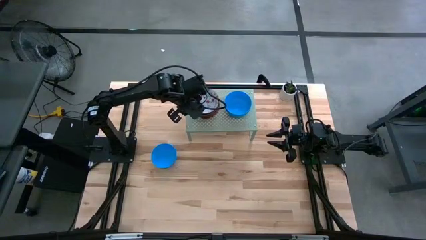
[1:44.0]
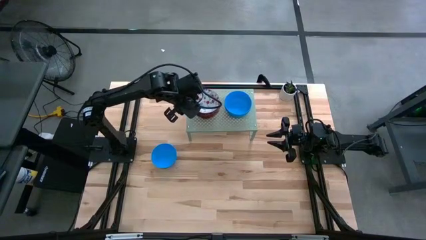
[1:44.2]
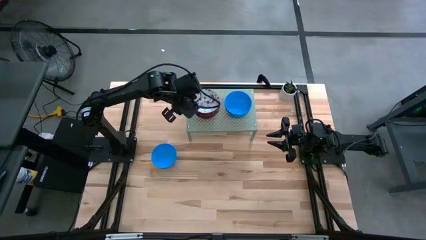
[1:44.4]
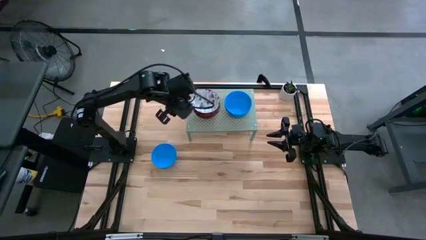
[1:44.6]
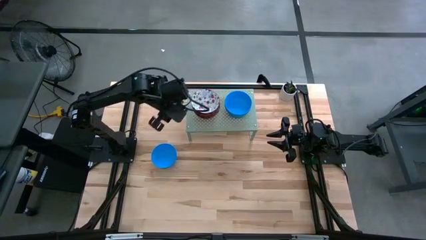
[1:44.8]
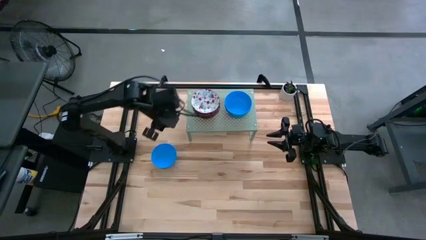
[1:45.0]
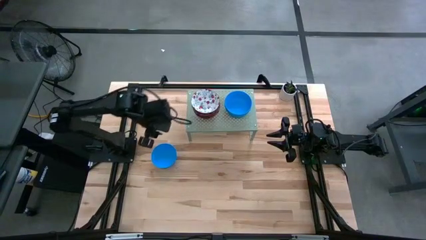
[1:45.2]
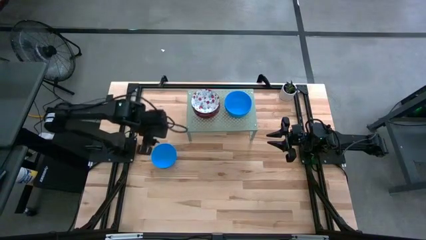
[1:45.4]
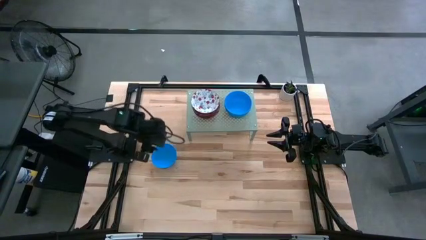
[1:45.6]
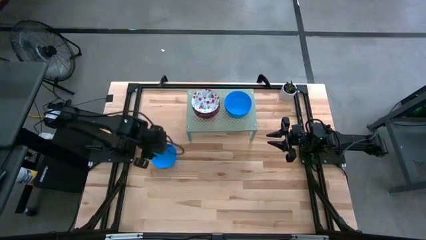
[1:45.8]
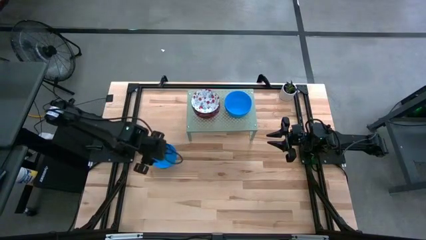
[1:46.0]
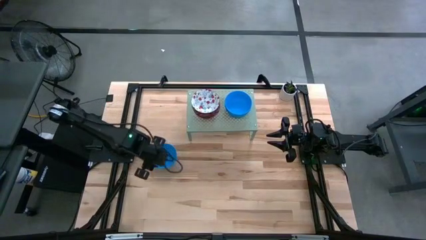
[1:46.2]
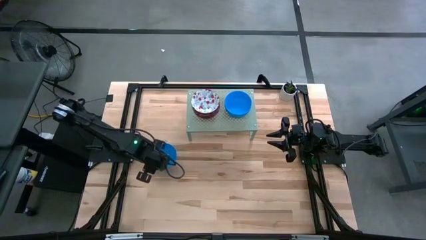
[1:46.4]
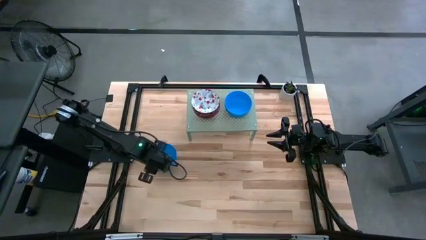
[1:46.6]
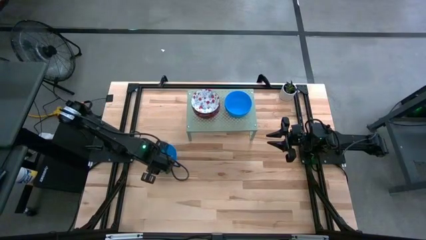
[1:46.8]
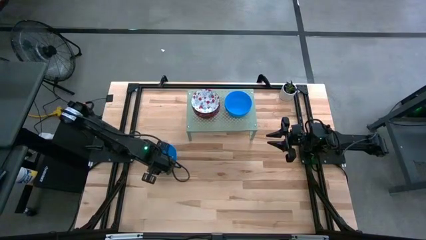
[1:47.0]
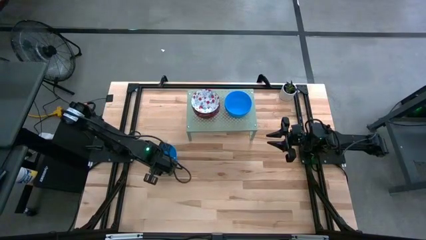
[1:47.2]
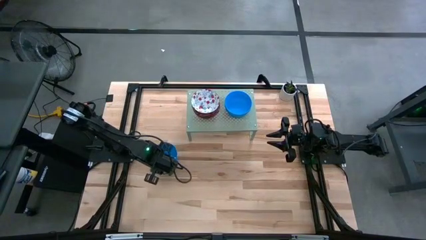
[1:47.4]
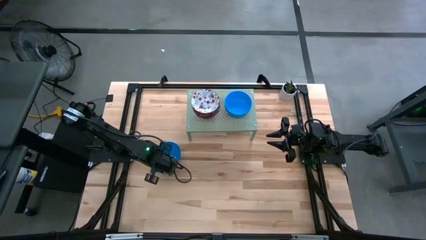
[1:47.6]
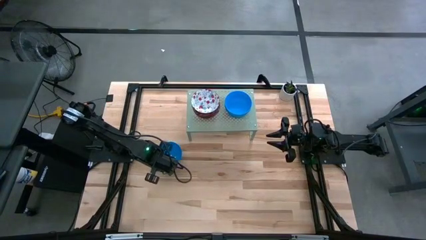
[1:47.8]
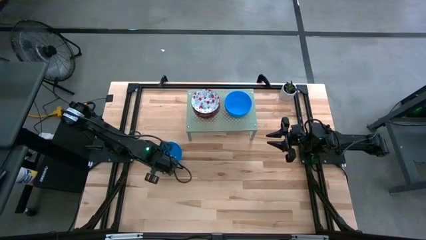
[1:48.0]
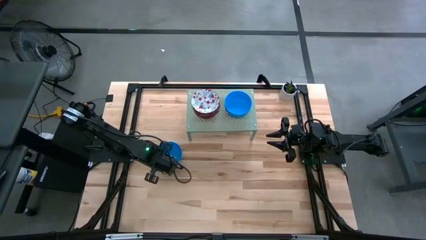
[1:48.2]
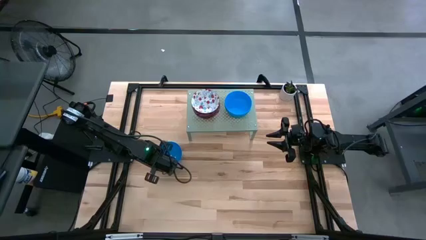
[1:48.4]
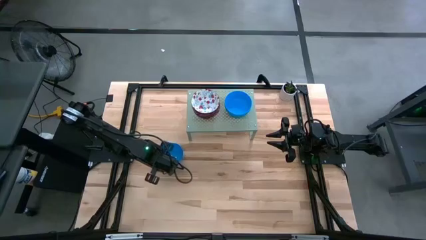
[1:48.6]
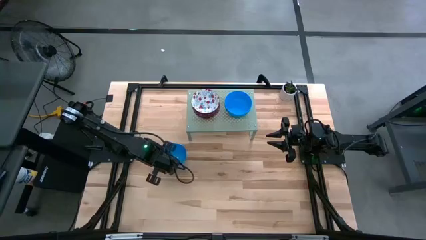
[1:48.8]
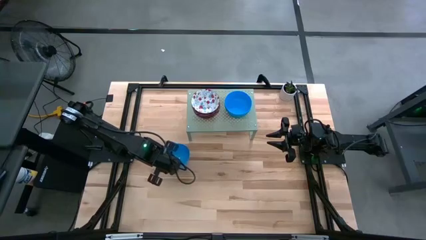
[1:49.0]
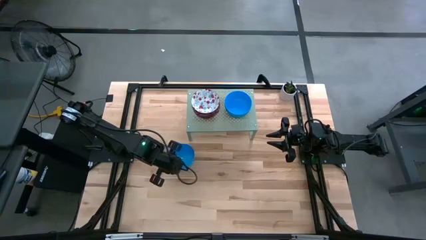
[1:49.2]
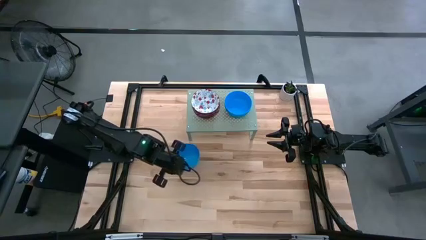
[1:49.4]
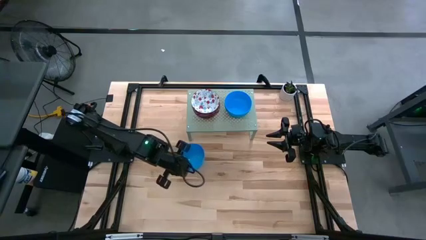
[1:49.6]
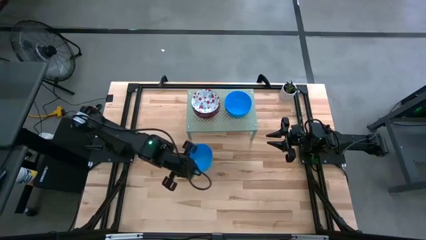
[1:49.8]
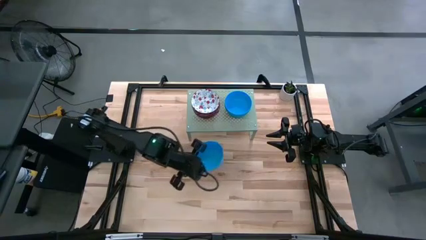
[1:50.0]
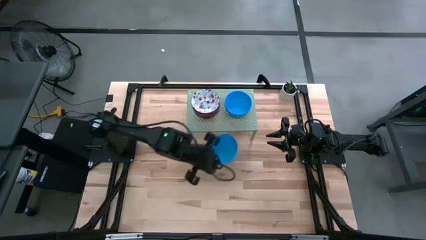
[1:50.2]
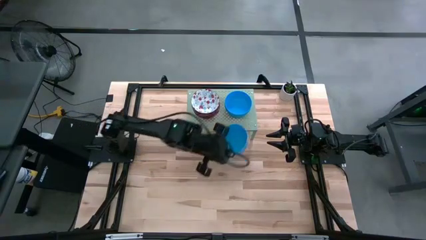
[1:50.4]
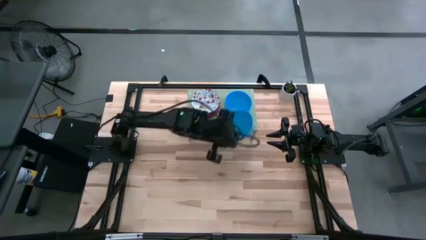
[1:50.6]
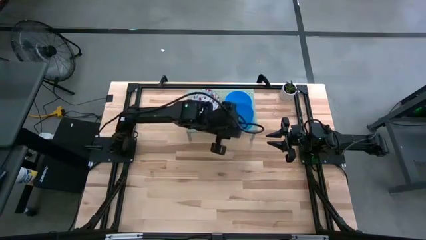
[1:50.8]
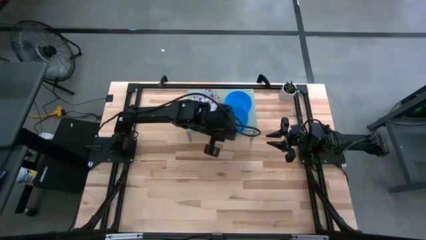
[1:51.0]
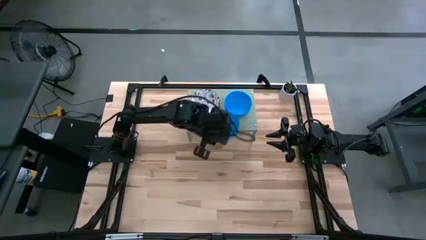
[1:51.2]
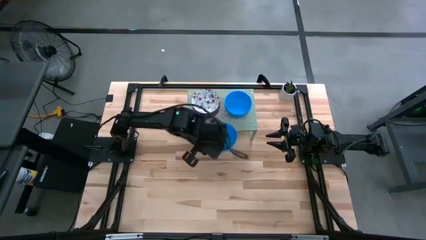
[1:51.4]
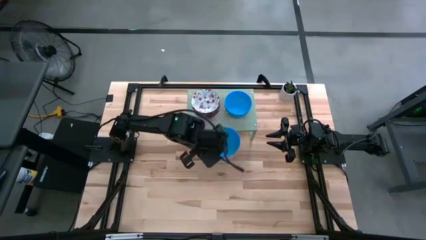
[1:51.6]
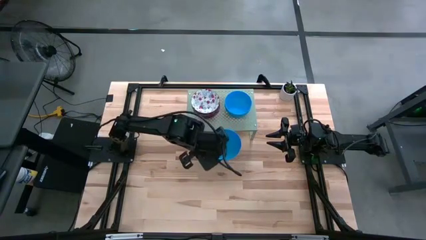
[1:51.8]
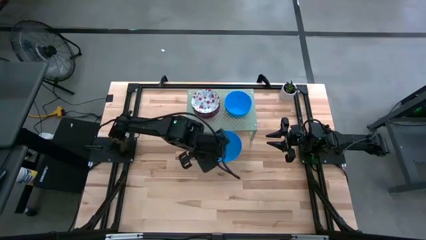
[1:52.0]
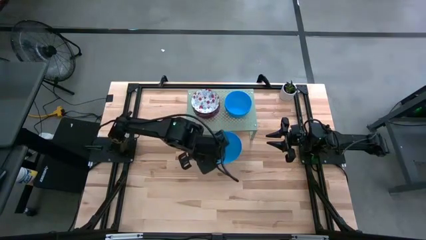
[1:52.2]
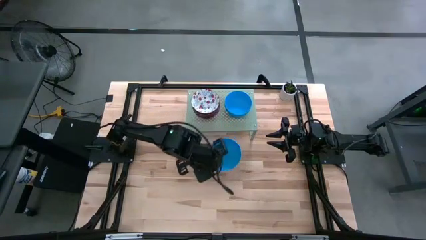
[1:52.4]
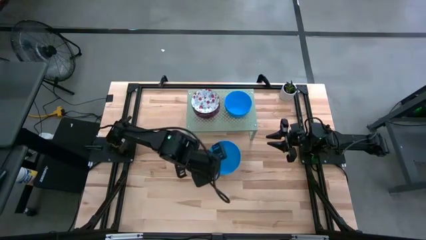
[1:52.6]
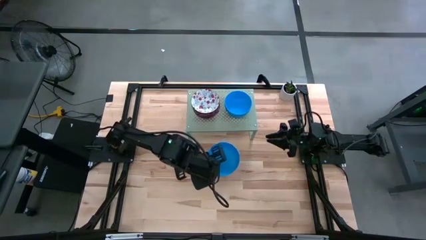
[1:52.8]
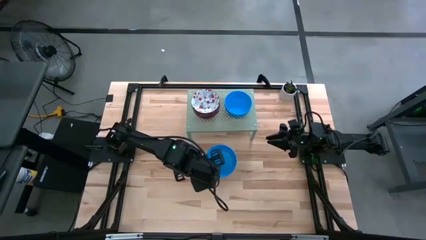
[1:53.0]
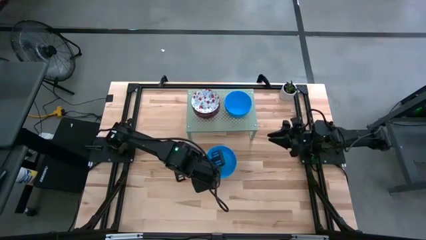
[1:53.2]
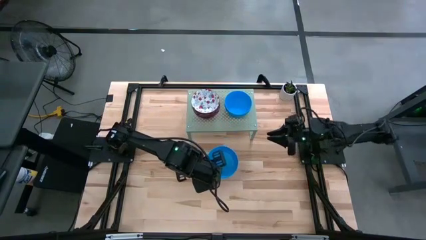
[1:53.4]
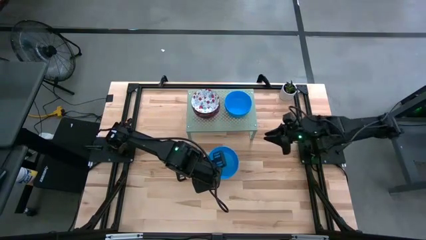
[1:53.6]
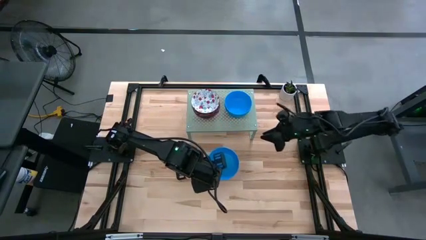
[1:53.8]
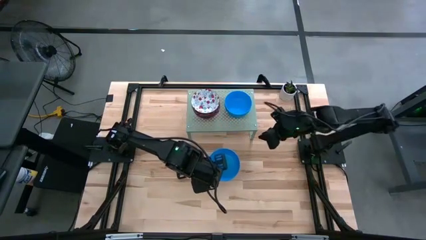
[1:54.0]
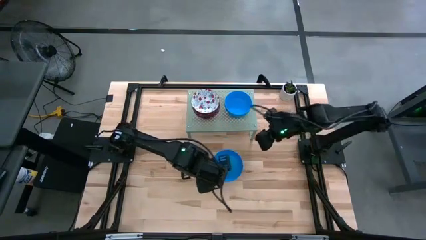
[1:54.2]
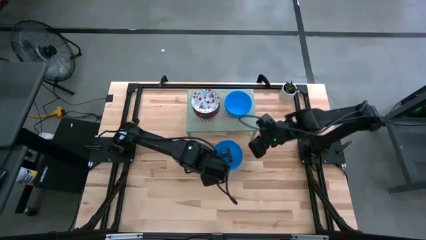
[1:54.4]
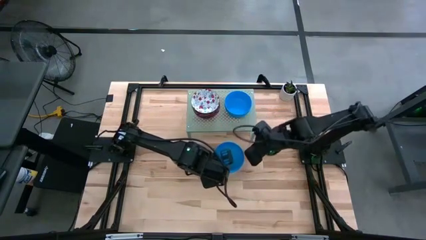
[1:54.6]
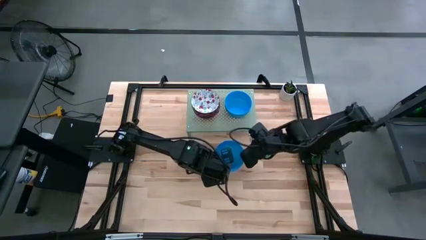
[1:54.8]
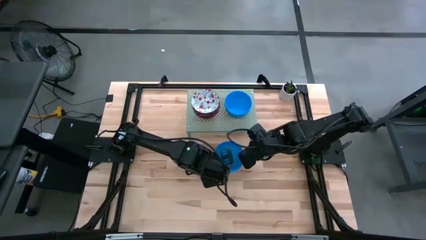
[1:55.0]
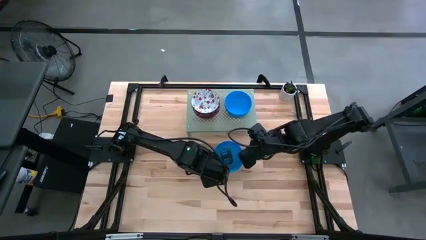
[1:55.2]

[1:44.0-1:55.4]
Task: Pick & Place Mini bowls
Stack the light blue bowl on the stacked light blue bowl on the shelf

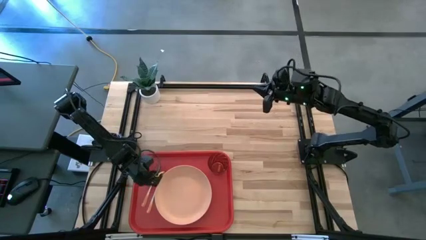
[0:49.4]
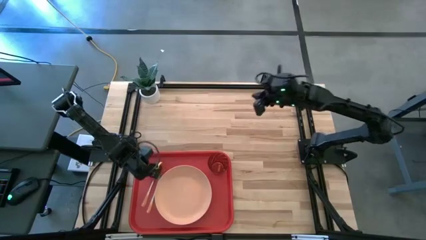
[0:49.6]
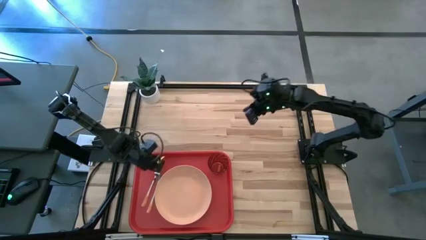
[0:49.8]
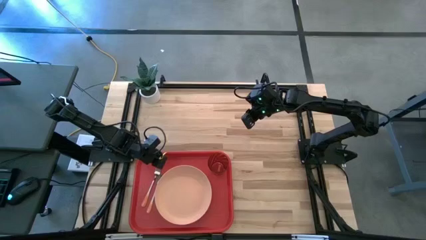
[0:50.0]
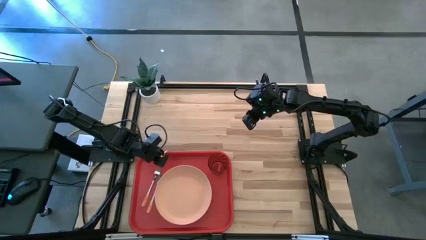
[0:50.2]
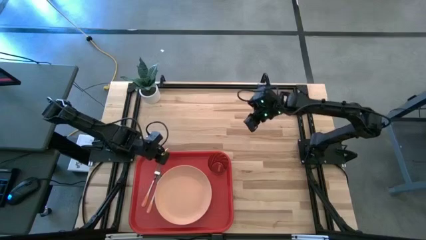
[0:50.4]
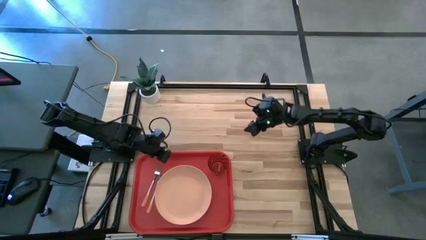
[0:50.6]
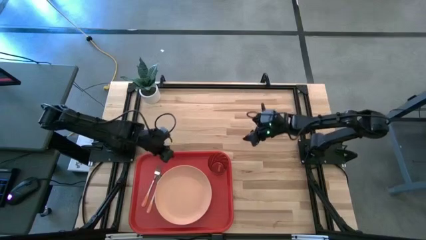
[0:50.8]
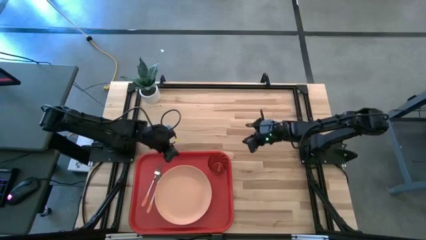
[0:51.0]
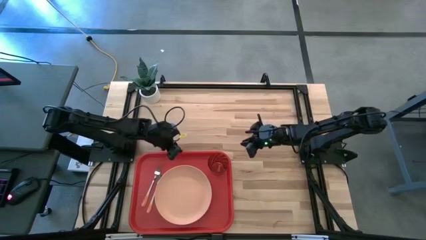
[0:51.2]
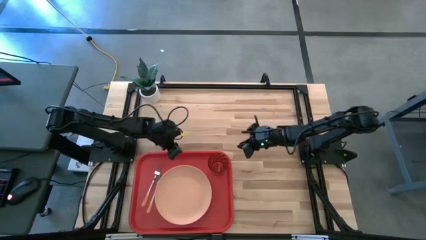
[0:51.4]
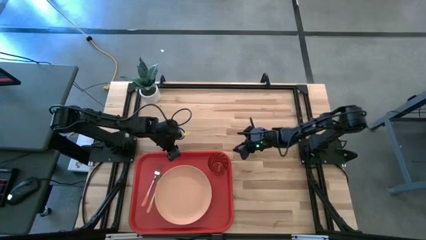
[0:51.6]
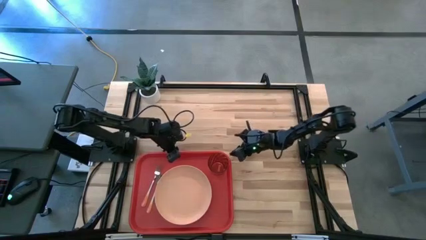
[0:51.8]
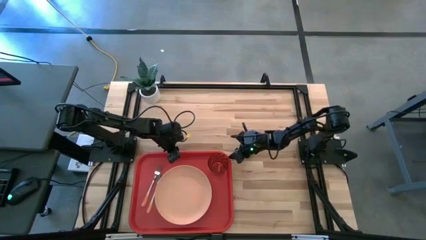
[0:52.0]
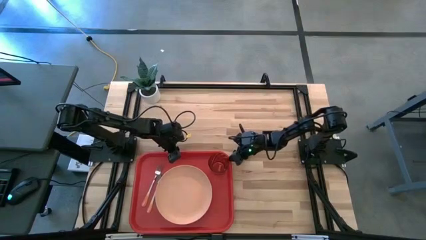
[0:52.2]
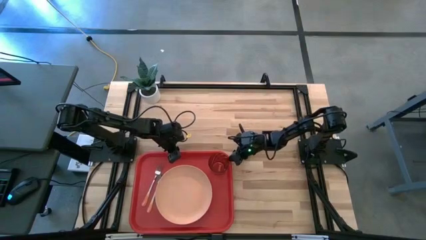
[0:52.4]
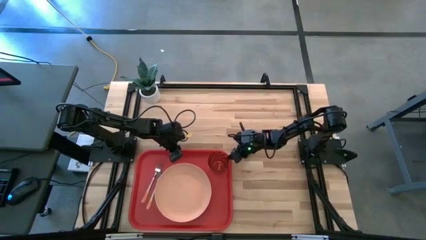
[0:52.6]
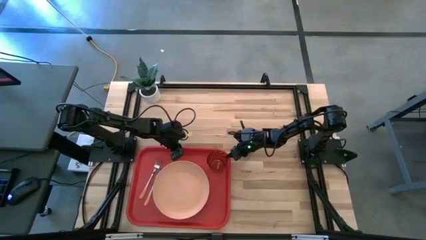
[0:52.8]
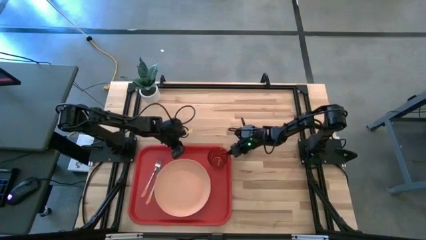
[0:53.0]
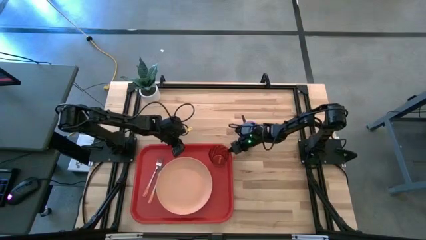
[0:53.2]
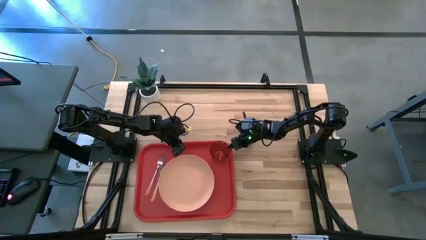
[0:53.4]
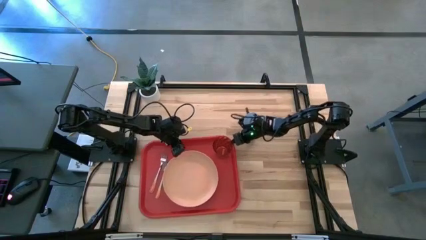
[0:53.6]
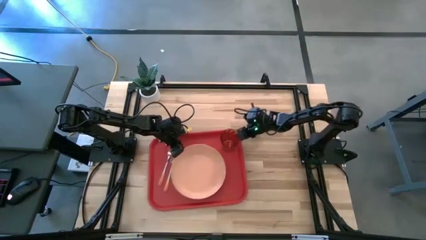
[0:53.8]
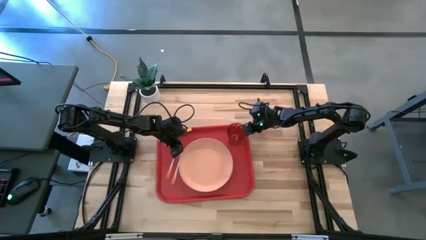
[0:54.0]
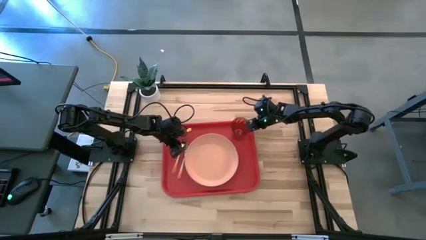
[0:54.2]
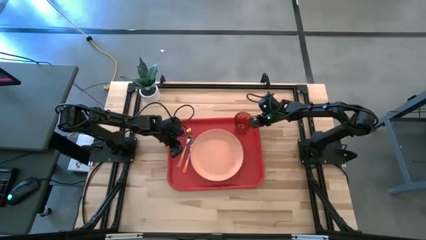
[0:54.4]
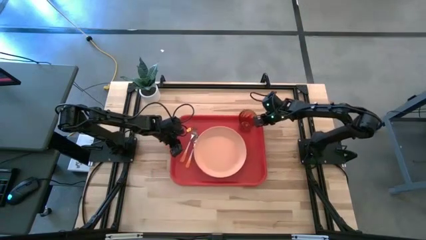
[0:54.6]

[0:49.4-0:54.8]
Task: Pick and place plate/cup/fork/spoon on tray
Move the red tray to the center of the table
